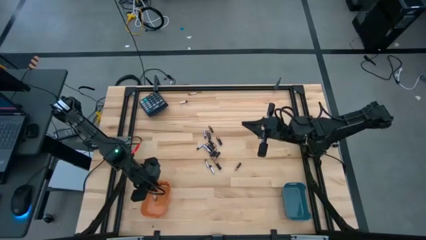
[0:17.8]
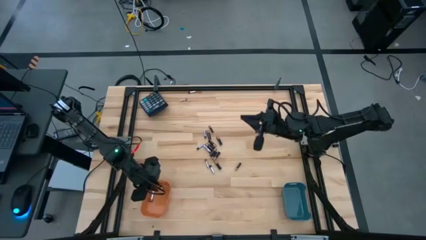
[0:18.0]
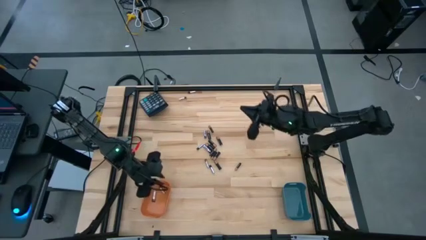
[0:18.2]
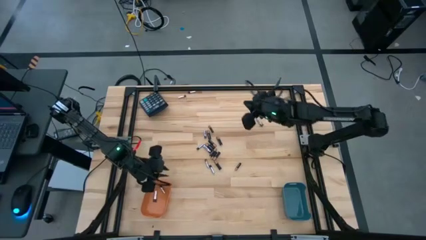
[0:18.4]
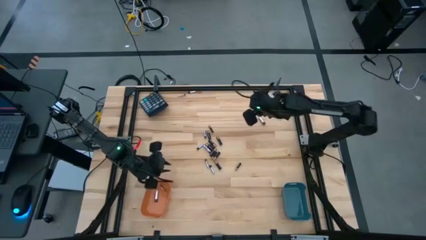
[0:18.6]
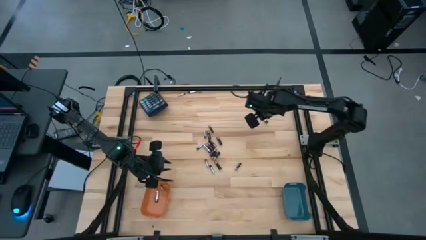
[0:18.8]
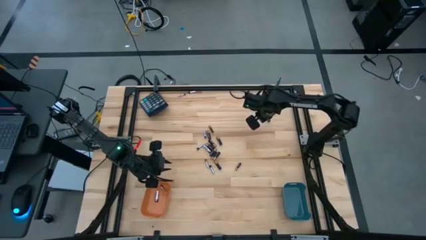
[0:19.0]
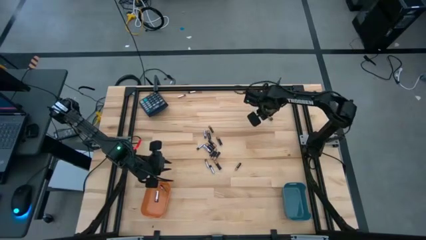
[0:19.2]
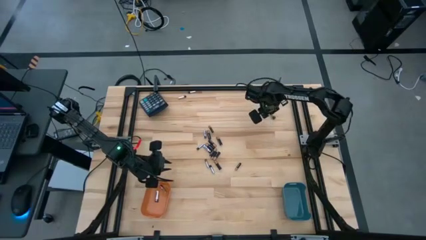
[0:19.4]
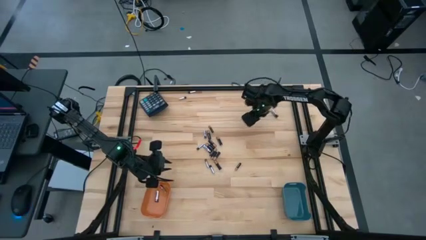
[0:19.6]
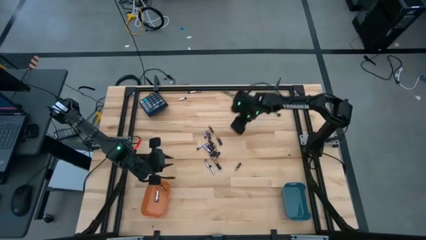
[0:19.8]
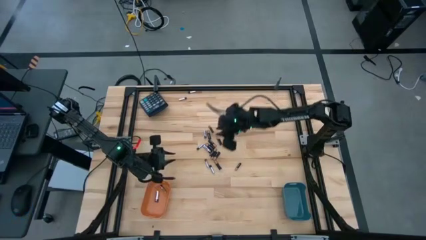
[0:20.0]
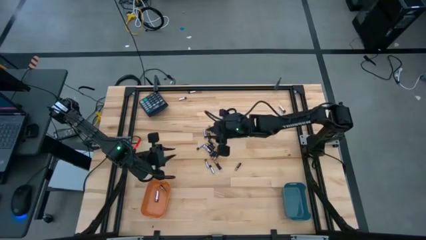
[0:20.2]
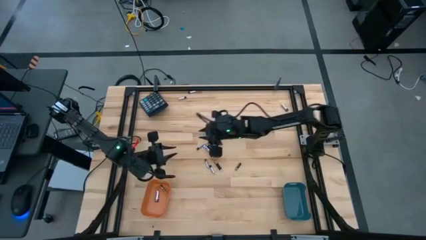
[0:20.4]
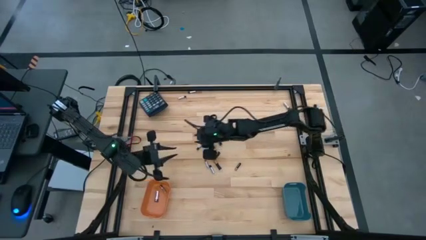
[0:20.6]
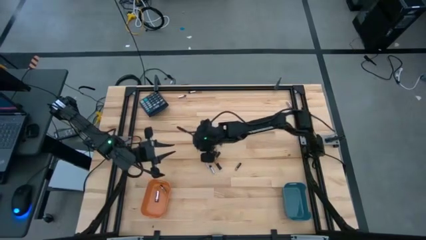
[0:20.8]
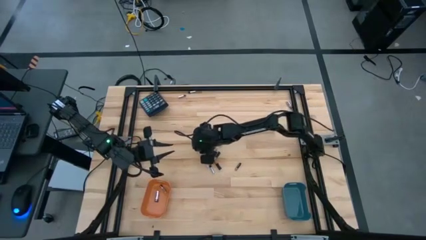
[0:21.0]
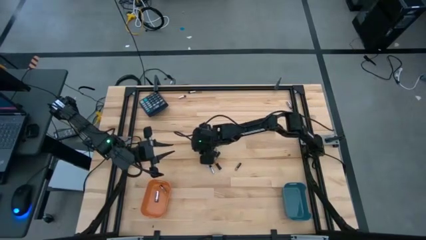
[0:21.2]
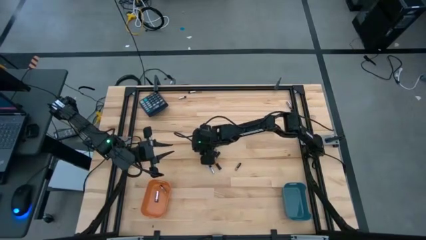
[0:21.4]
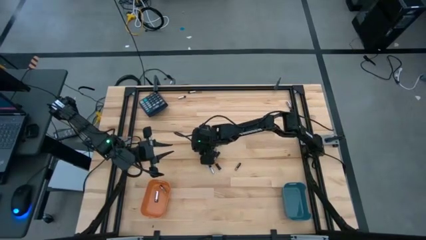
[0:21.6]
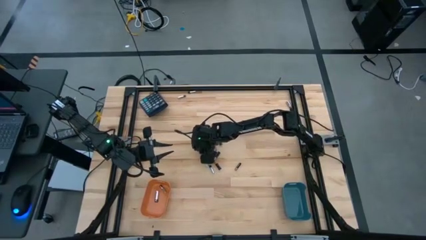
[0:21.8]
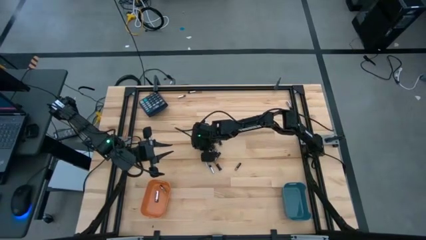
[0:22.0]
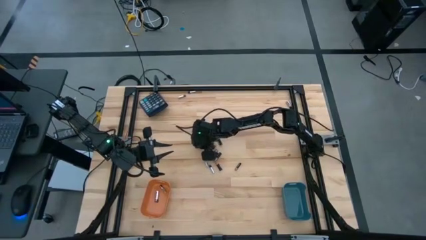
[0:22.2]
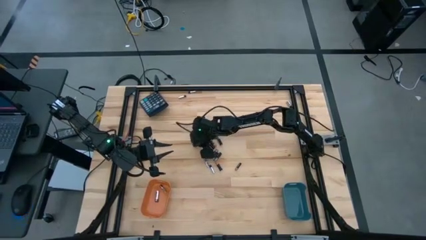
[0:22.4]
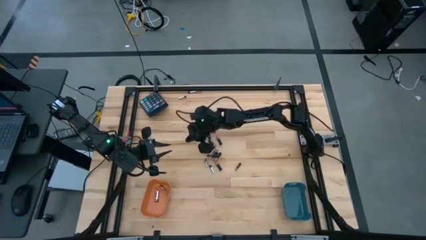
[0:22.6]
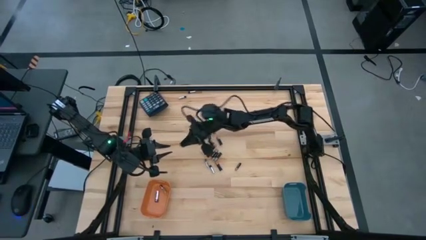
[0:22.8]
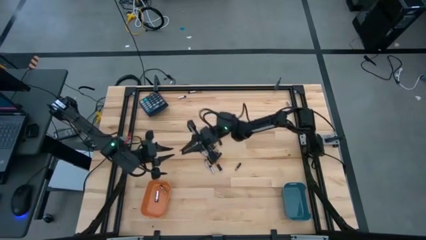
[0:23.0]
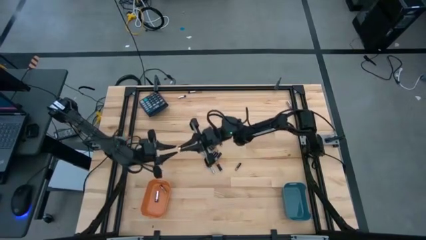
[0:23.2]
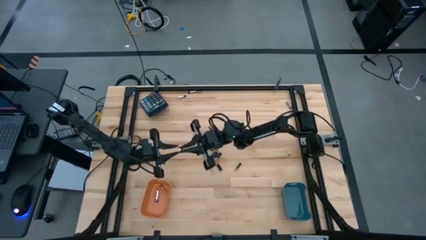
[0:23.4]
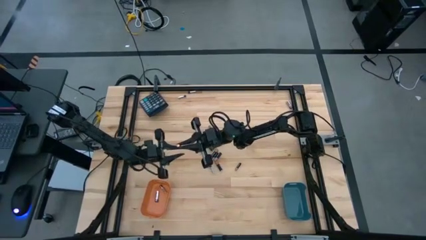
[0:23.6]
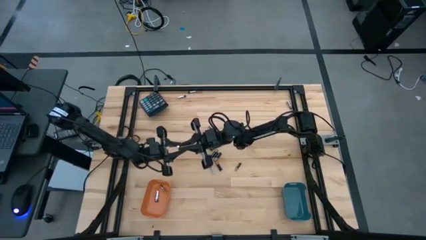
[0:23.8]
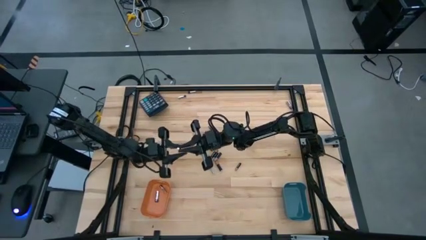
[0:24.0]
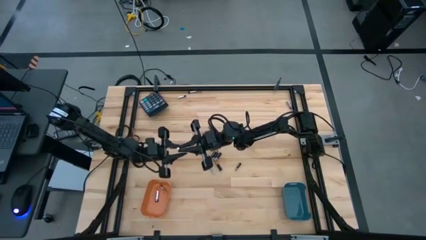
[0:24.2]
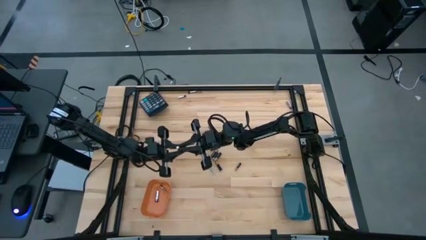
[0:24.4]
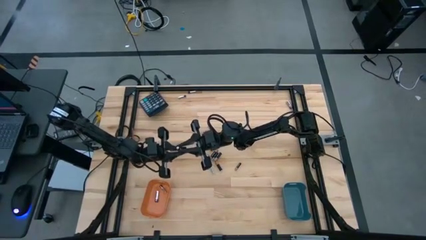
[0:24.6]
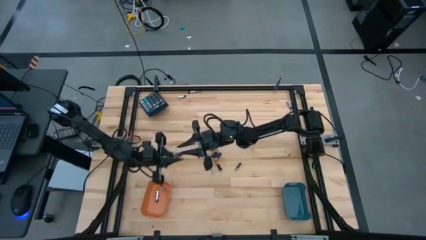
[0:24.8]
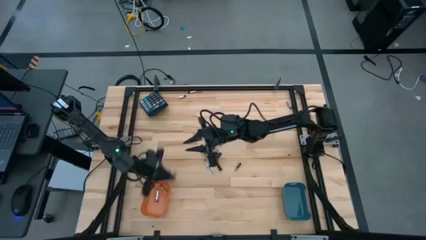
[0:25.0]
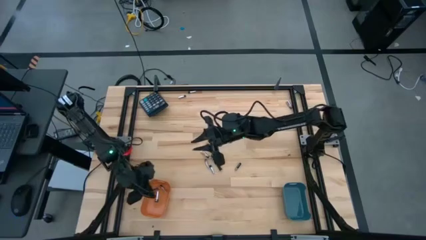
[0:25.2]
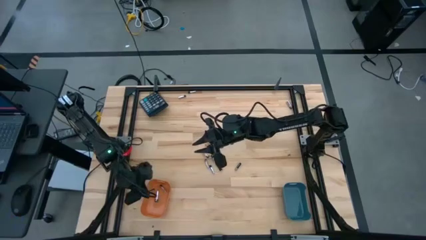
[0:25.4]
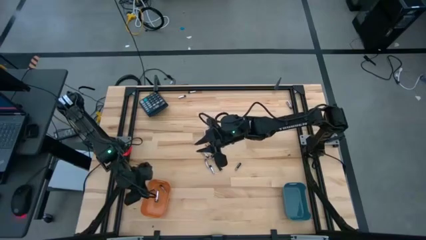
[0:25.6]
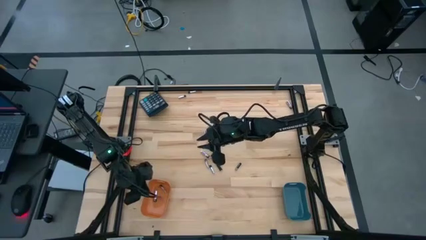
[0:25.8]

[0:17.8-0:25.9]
Task: Sort batteries
Put the silver battery into the orange bin

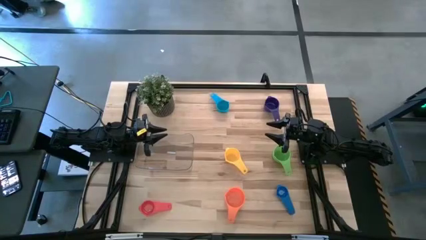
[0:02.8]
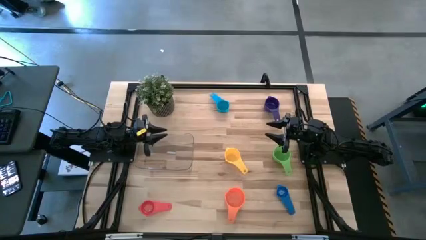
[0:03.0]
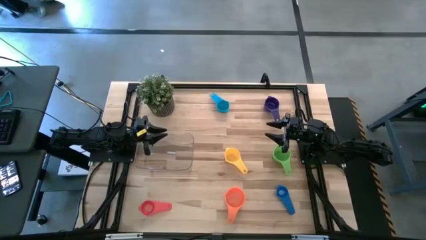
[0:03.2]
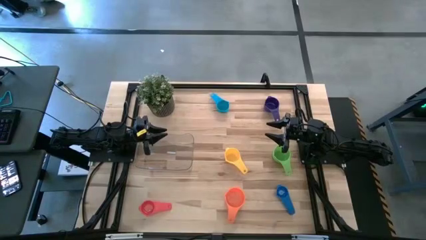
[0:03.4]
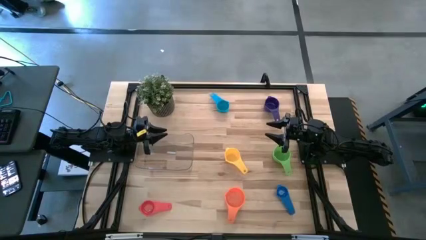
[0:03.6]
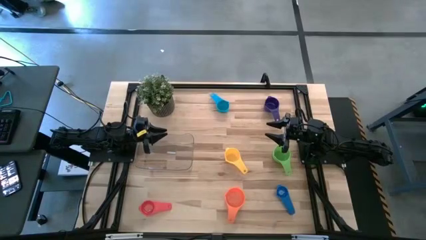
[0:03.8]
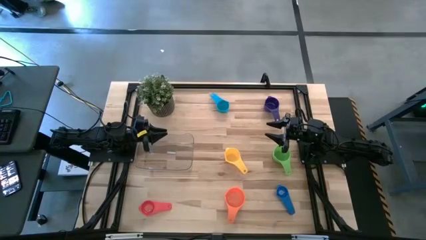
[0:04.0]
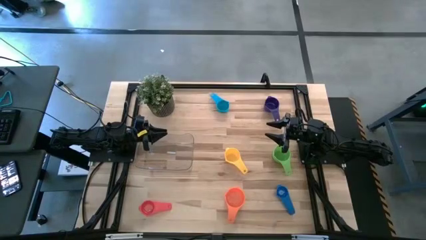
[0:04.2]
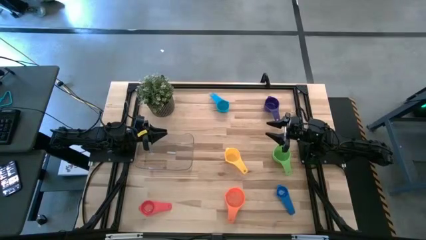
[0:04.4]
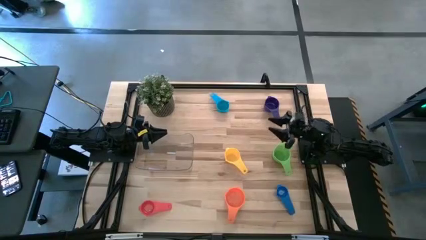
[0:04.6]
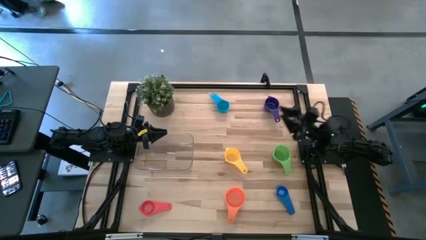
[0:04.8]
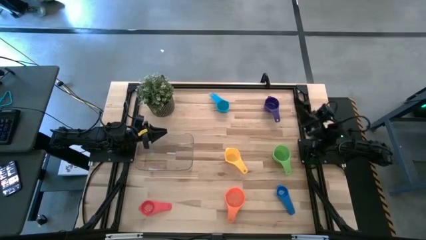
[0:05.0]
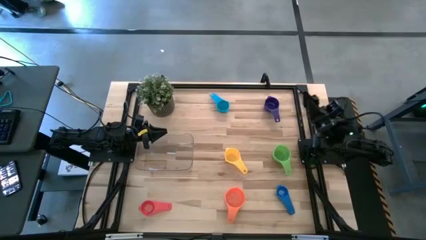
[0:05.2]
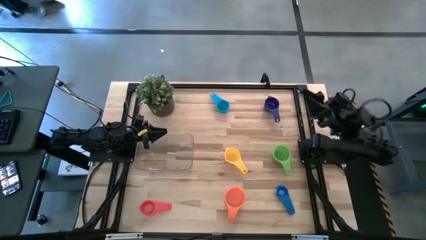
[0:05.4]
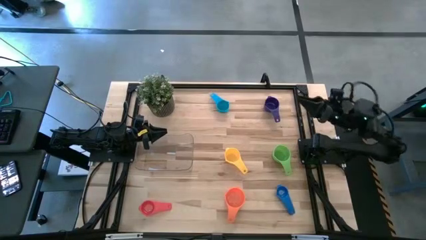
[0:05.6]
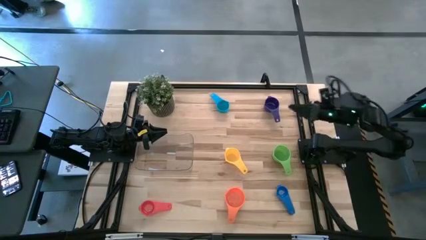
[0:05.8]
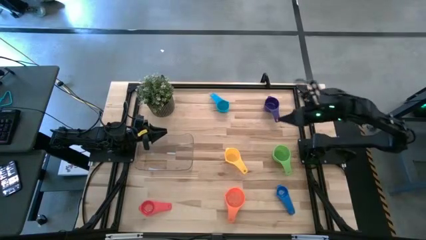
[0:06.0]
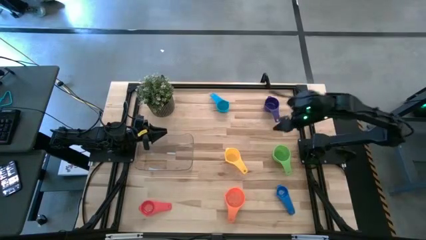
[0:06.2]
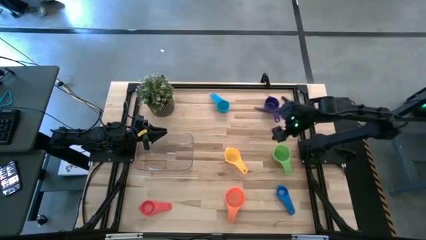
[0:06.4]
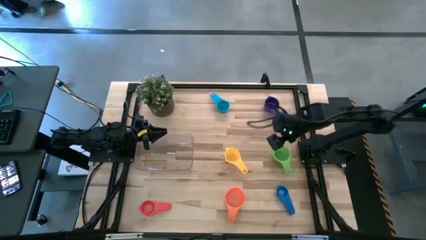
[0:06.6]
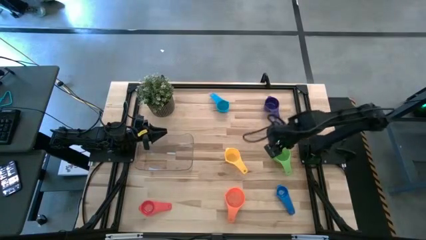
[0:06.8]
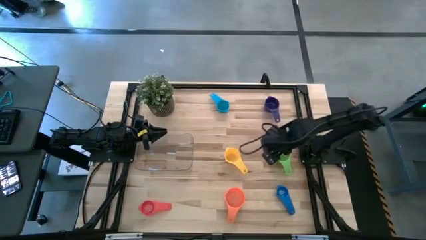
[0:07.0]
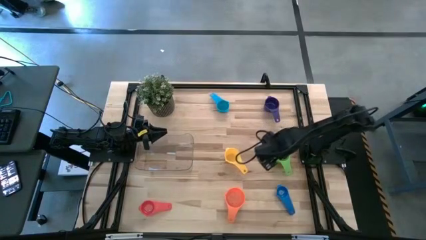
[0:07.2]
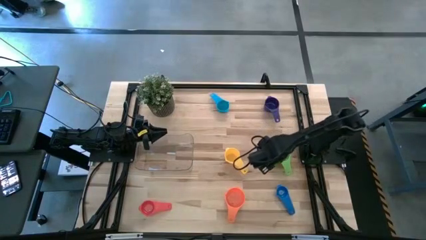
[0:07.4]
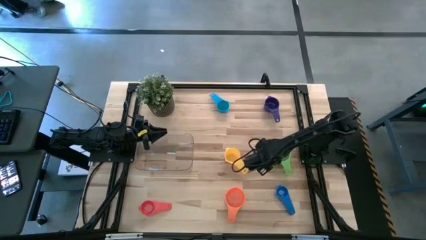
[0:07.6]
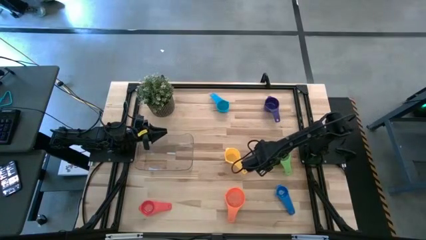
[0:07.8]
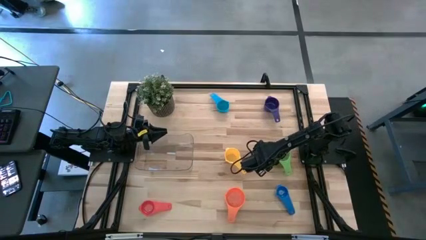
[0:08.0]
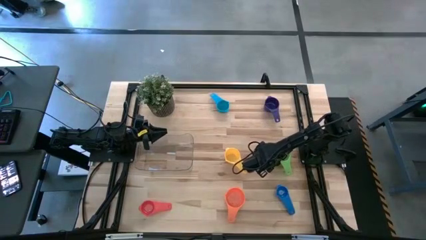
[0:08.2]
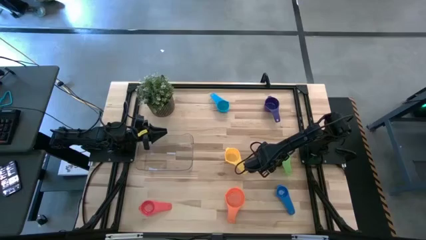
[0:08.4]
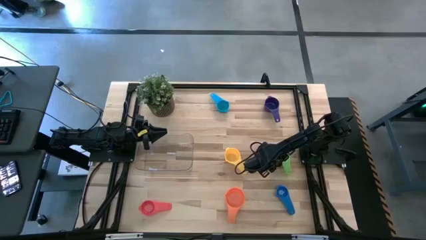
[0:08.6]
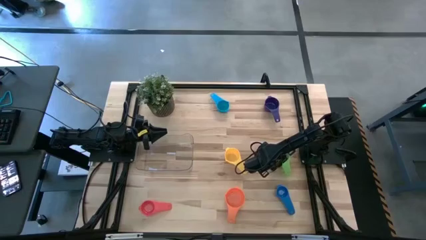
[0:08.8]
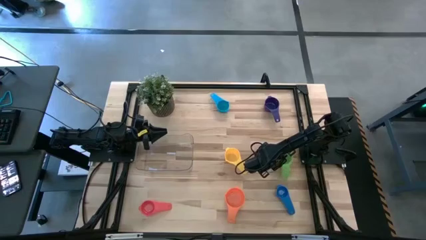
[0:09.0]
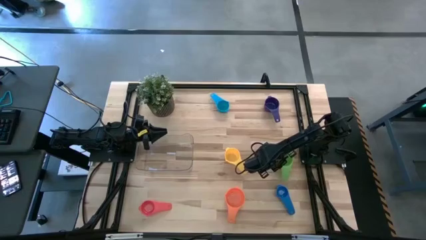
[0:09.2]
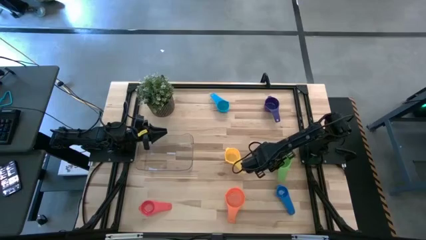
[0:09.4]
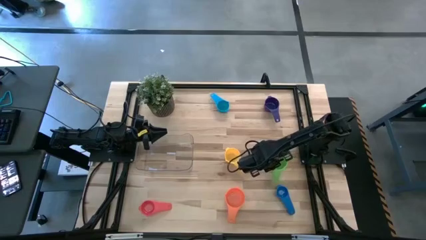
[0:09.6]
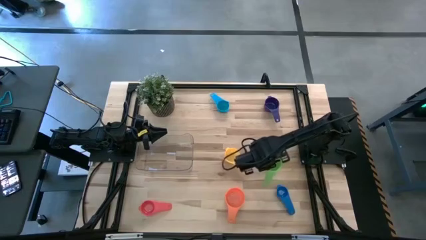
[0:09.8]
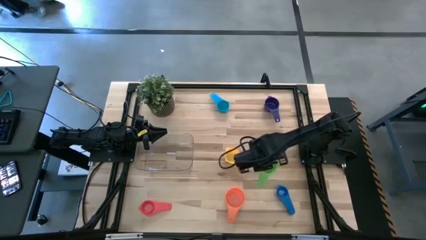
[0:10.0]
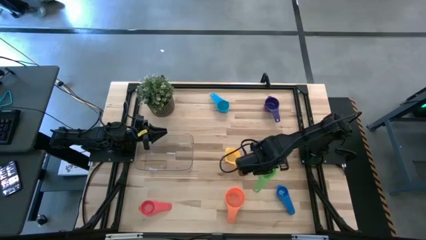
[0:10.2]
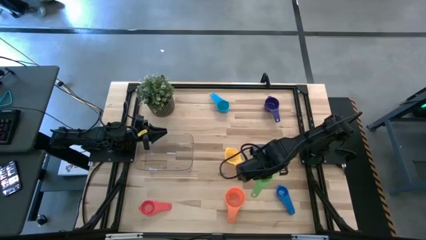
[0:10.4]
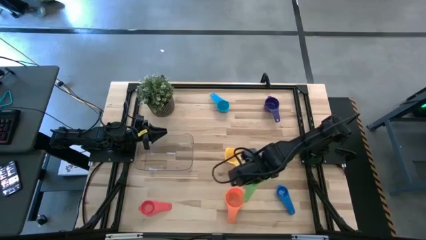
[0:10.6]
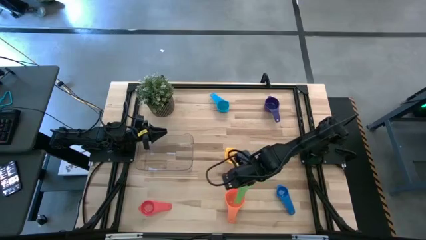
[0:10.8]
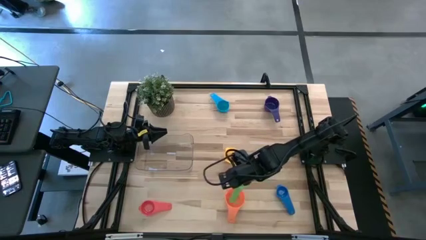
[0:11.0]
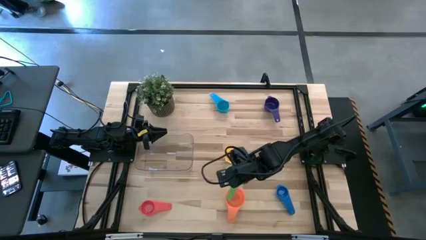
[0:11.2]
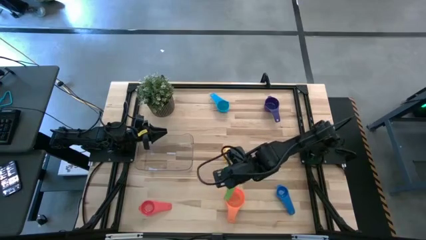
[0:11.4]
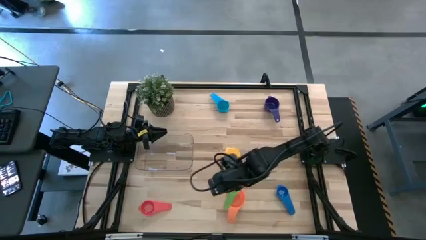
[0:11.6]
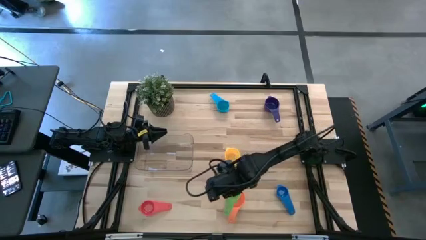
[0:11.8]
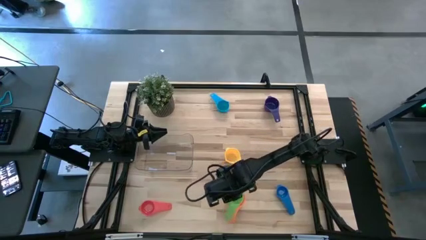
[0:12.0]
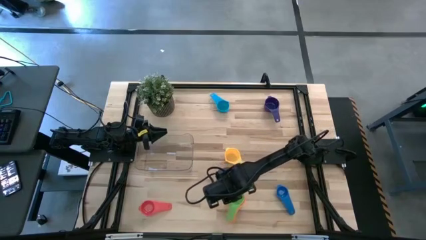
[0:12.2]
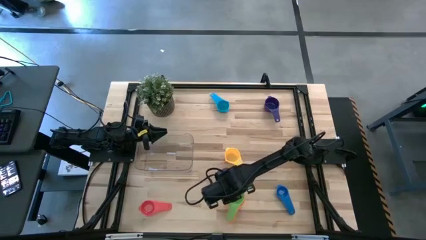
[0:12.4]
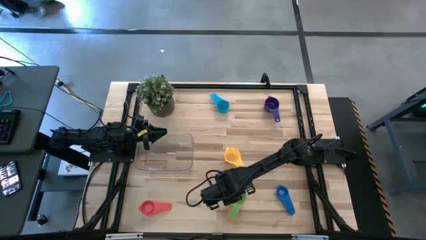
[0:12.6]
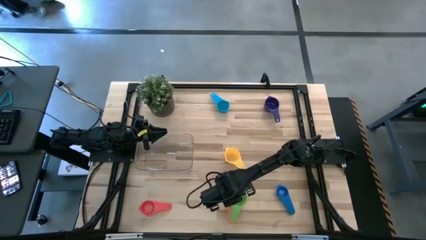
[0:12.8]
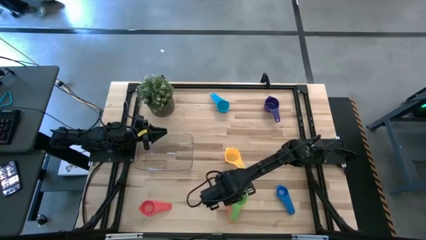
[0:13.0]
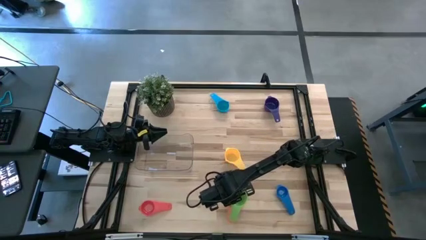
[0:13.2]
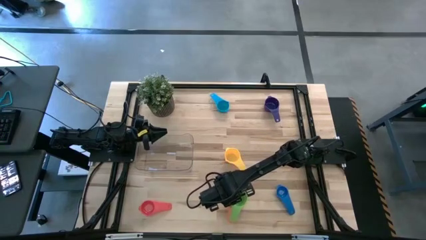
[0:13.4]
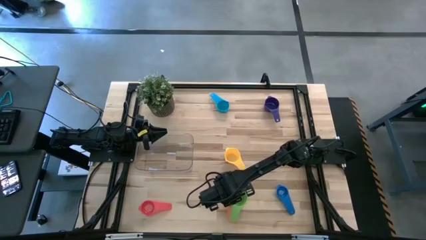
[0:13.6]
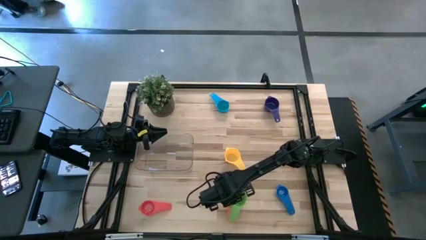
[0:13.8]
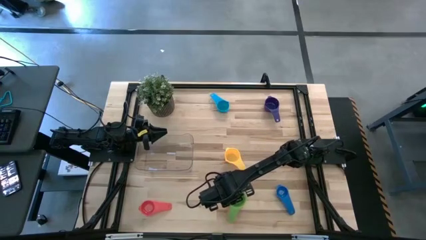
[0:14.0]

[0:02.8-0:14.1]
Task: Nest measuring cups in basket
Stack the green measuring cup on top of the orange measuring cup
